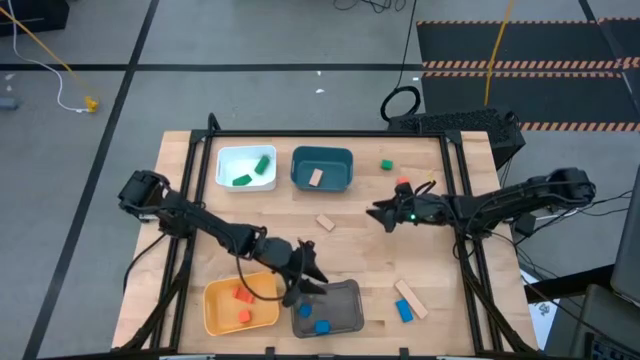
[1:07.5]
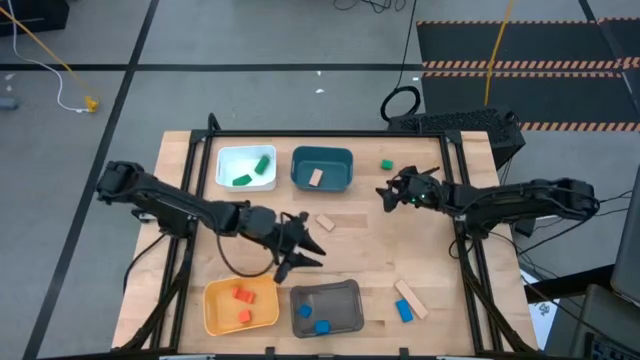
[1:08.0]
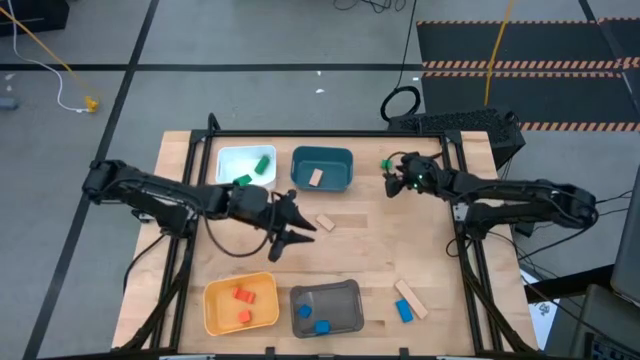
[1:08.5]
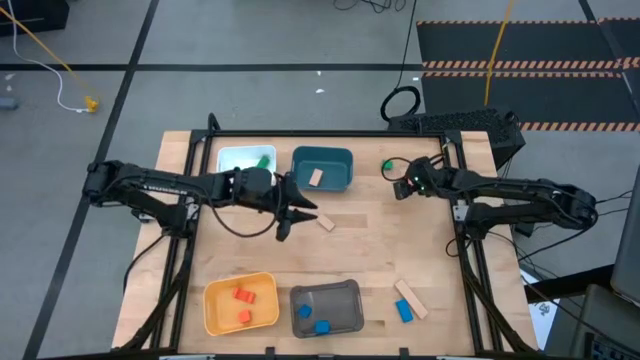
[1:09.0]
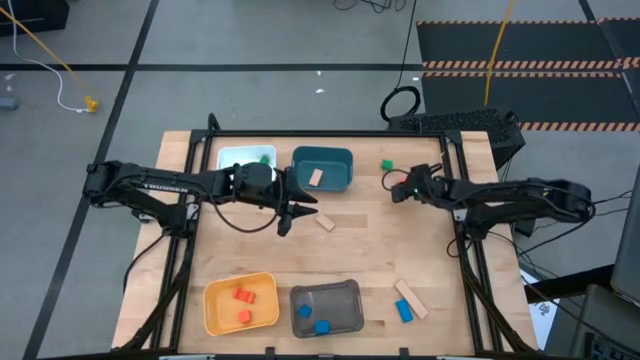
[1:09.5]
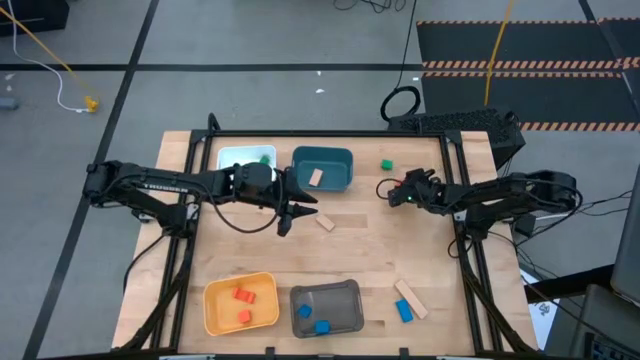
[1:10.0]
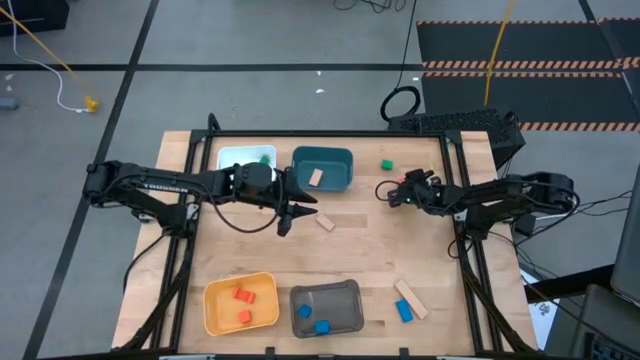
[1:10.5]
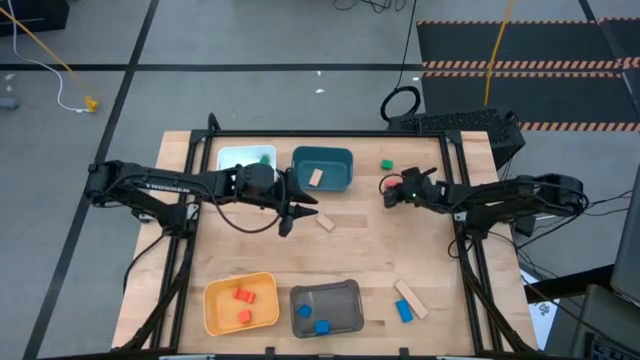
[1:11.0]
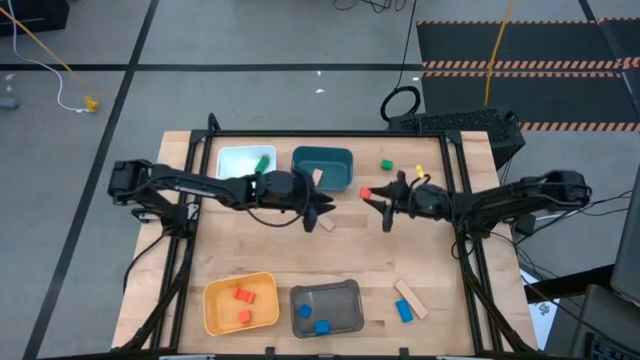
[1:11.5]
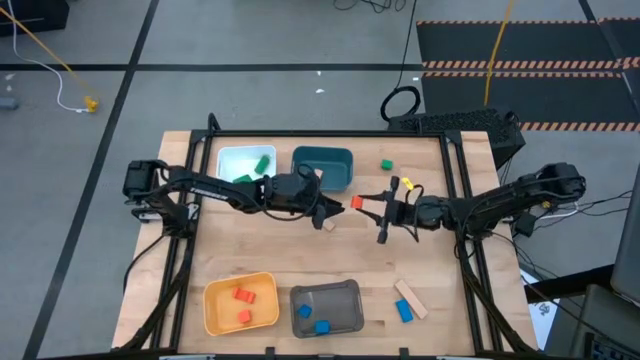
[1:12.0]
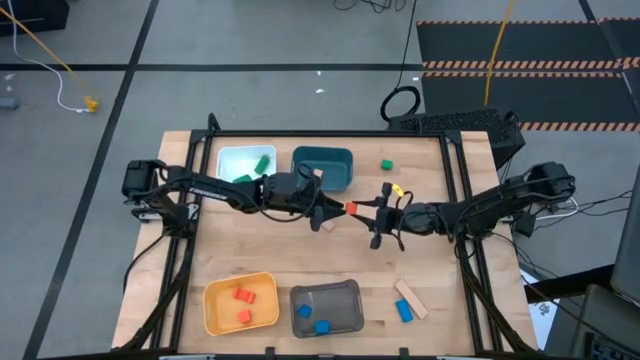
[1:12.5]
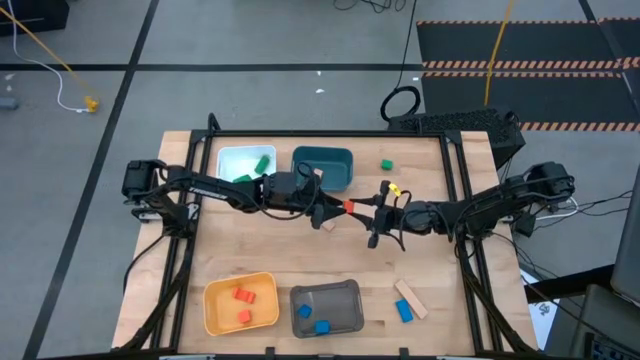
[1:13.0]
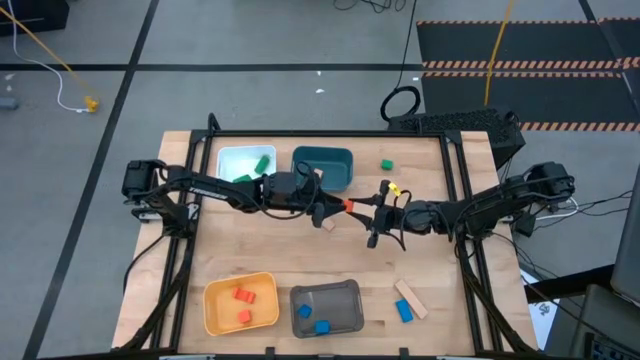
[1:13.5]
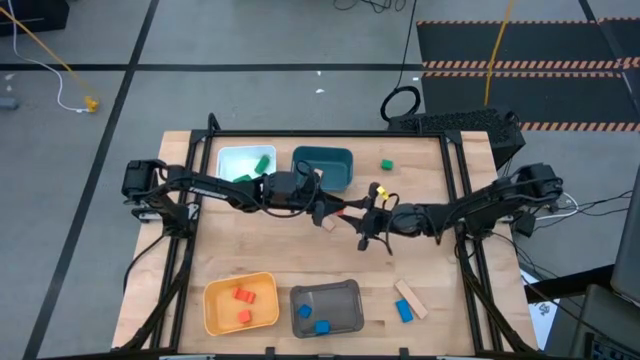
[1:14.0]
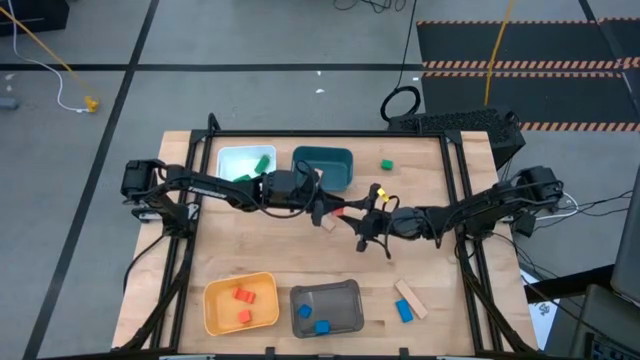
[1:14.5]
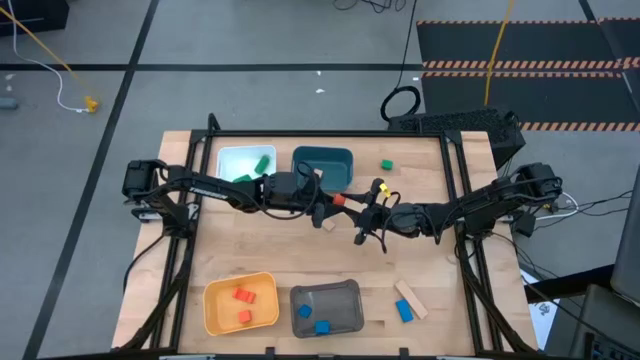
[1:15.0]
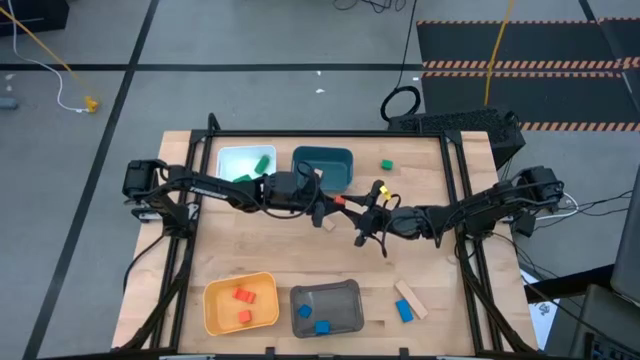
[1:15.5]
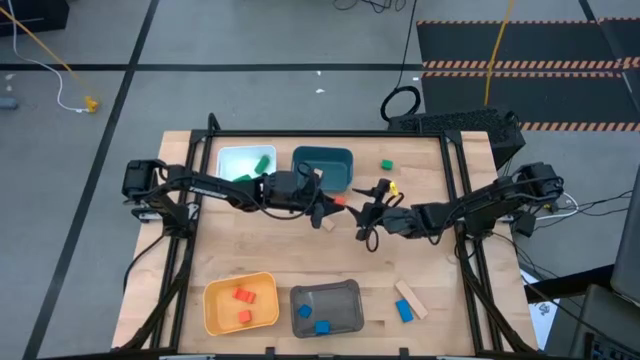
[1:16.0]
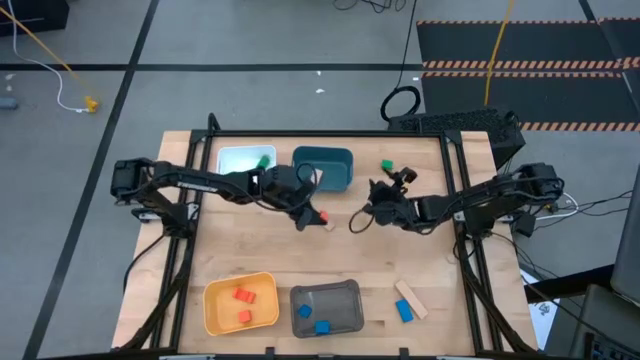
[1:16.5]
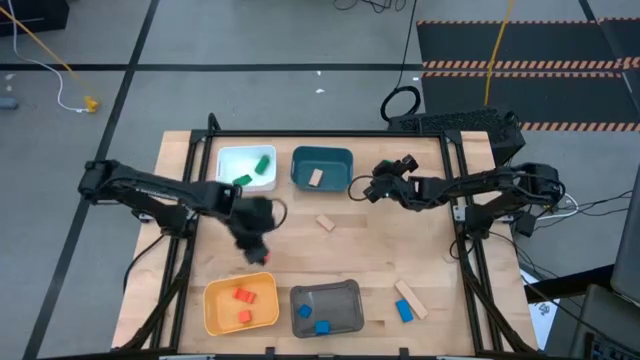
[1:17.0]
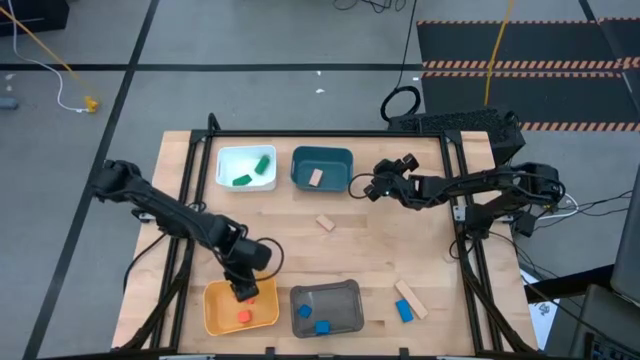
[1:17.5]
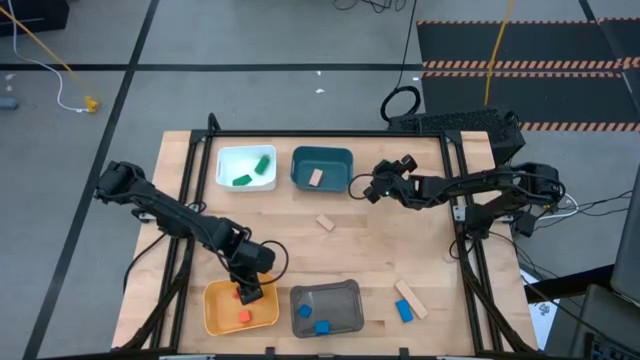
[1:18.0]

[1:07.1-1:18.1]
Task: Sort & place blocks by color
Put the orange block into the yellow bin

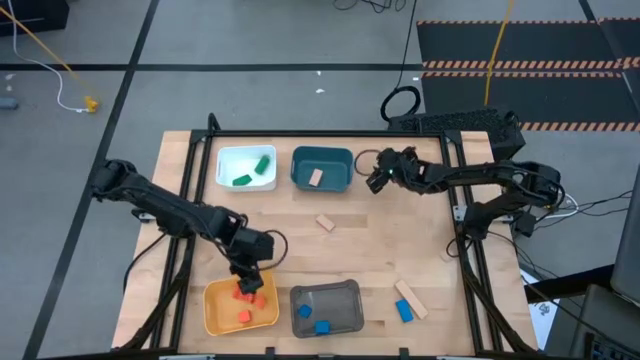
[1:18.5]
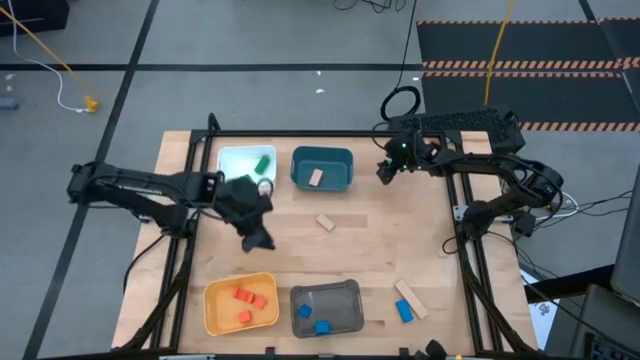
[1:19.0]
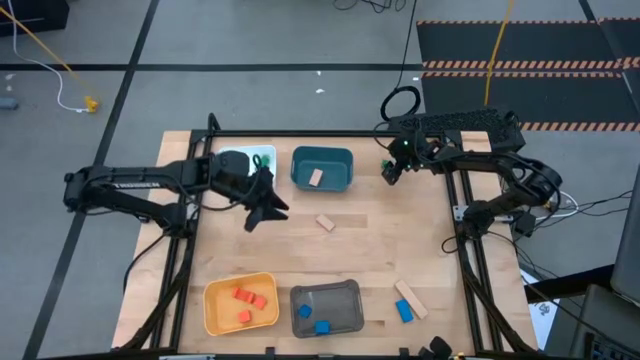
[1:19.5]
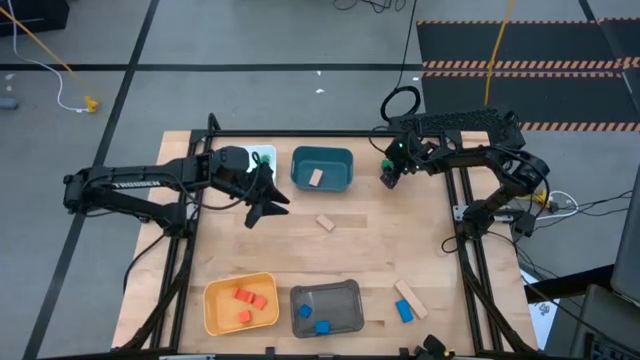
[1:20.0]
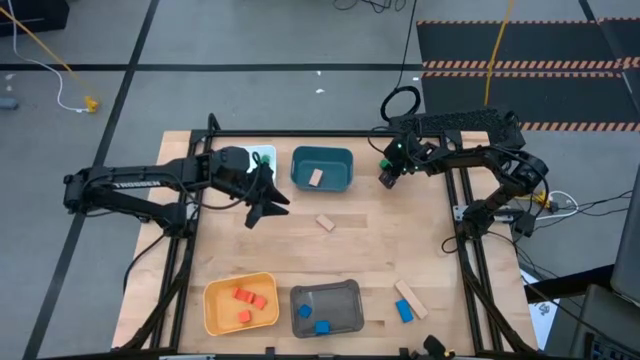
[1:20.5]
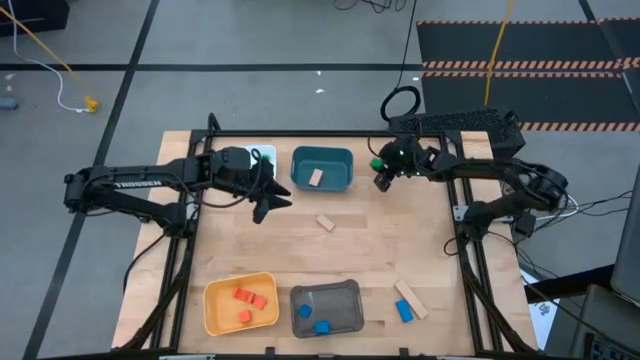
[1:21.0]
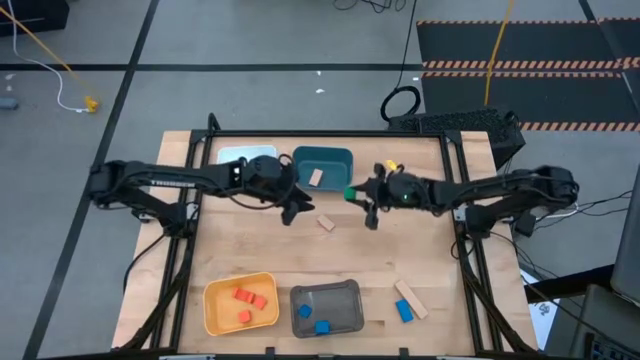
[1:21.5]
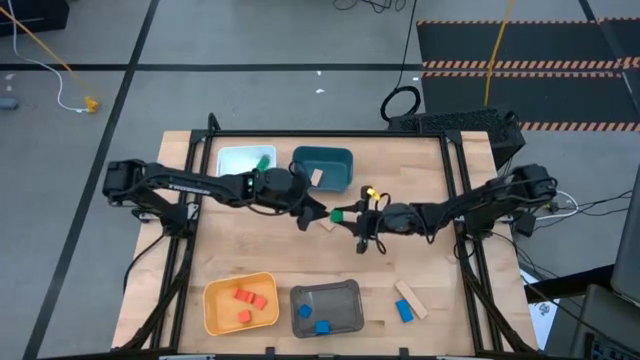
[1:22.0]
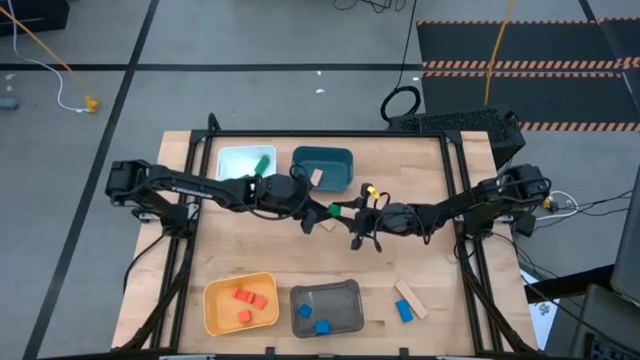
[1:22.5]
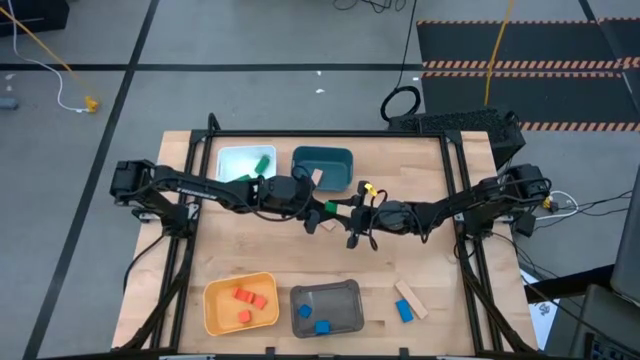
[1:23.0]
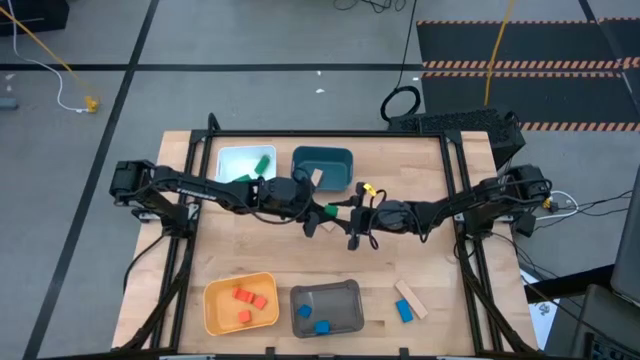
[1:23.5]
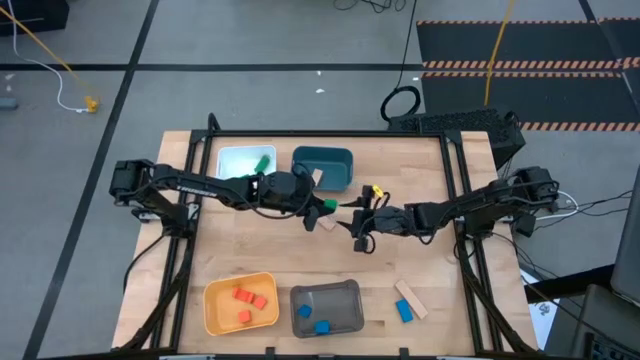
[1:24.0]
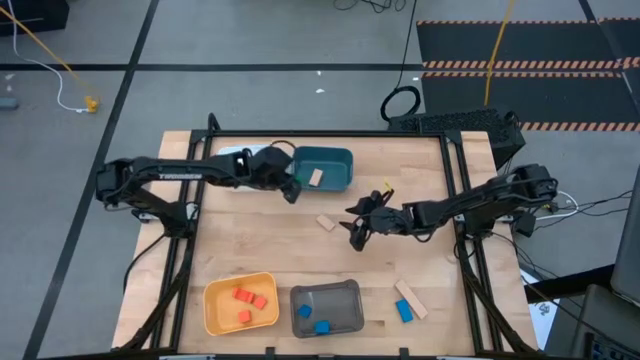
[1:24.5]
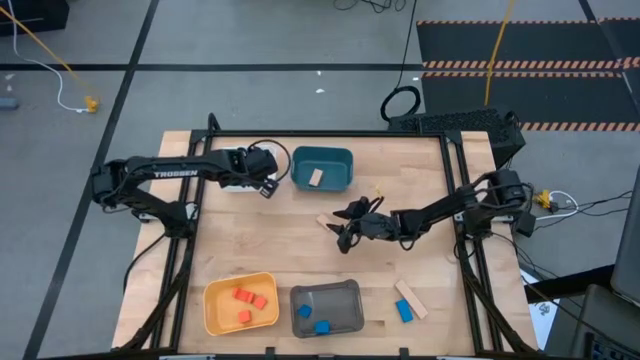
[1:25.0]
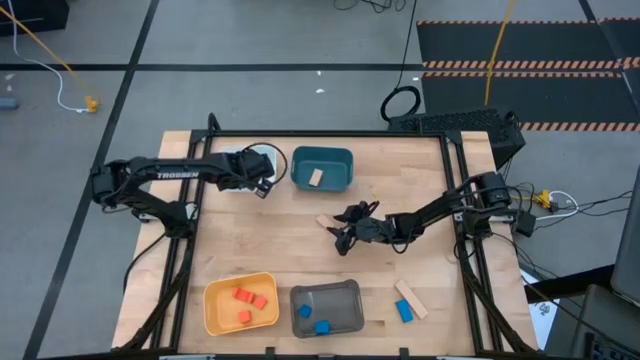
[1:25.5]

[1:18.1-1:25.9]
Put the green block into the white bin

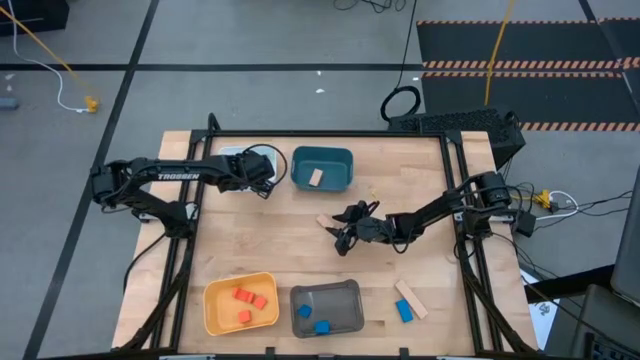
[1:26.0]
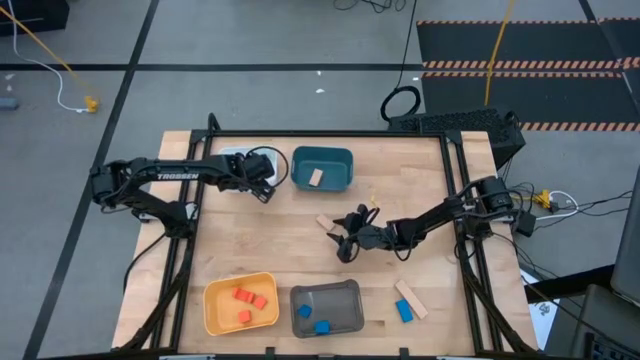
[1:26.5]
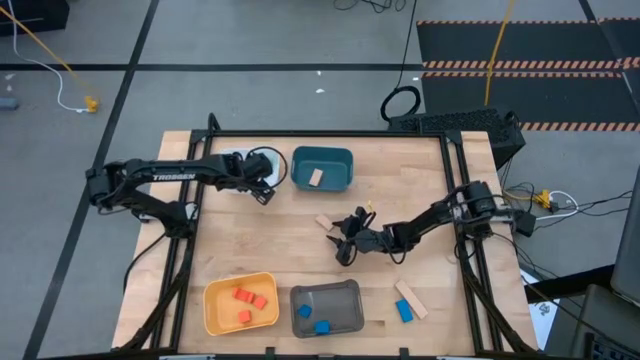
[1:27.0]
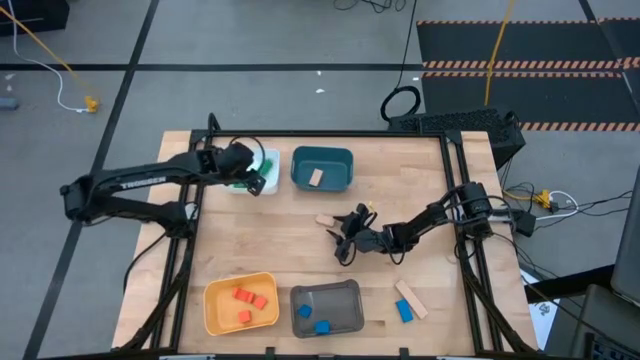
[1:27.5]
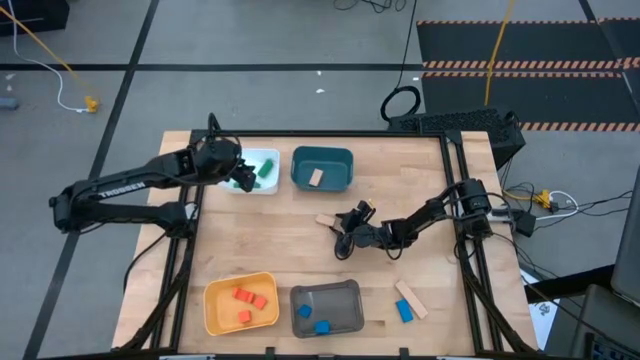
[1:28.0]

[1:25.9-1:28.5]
Put the top brown block into the blue bin
